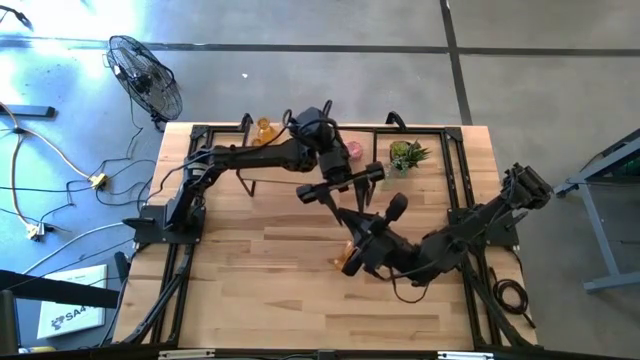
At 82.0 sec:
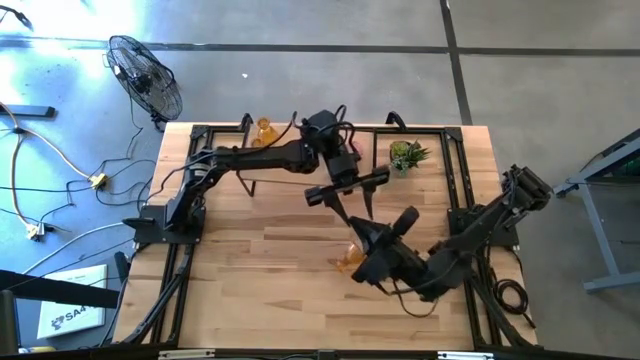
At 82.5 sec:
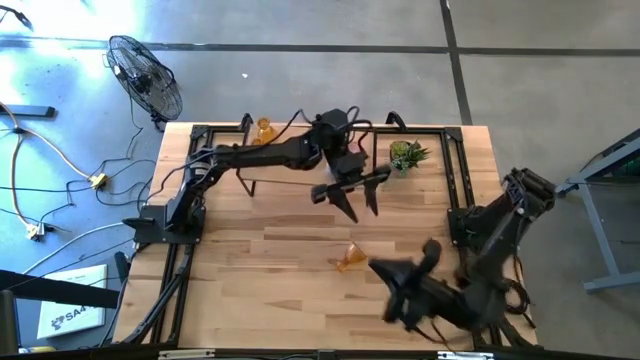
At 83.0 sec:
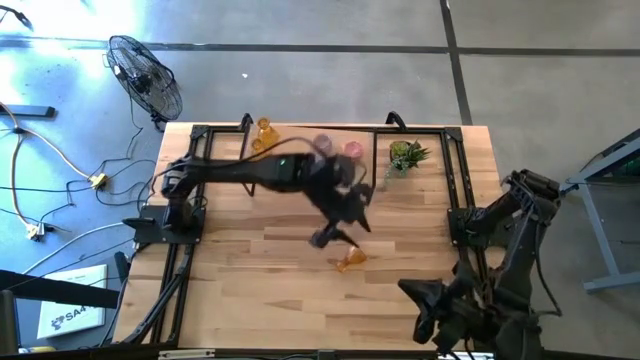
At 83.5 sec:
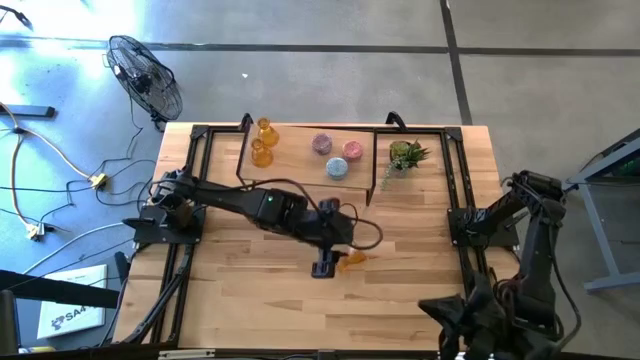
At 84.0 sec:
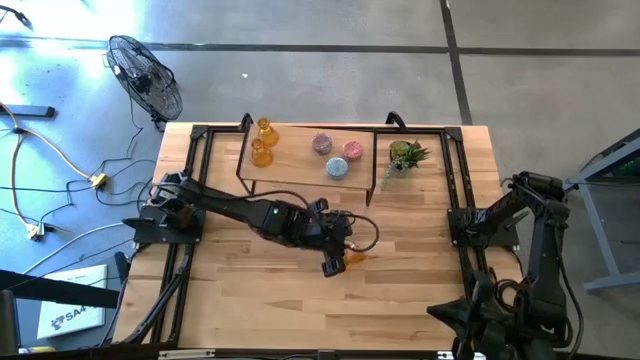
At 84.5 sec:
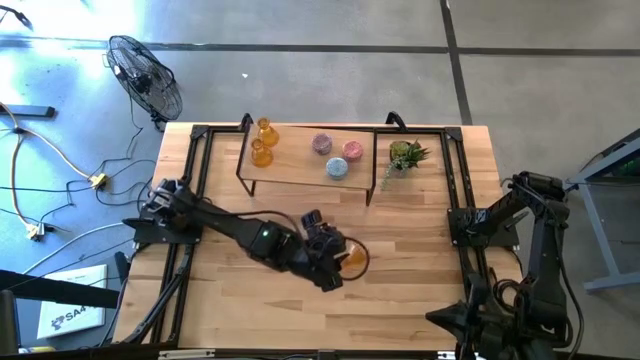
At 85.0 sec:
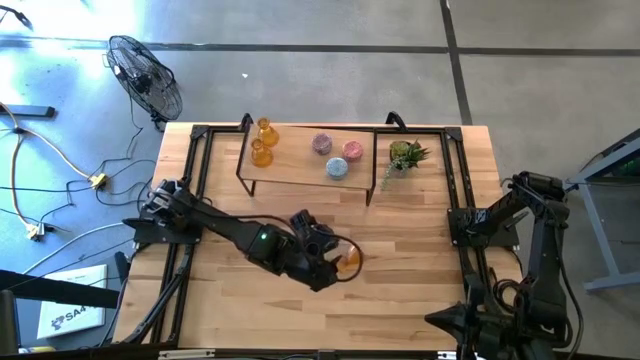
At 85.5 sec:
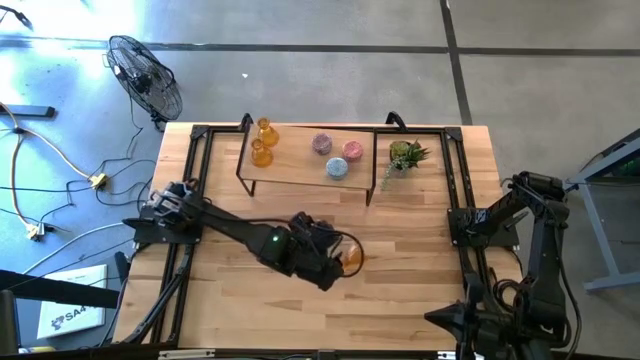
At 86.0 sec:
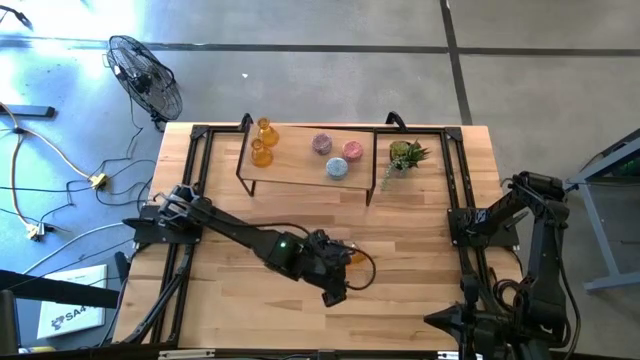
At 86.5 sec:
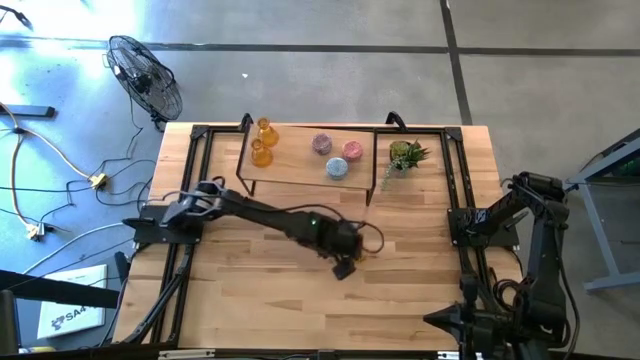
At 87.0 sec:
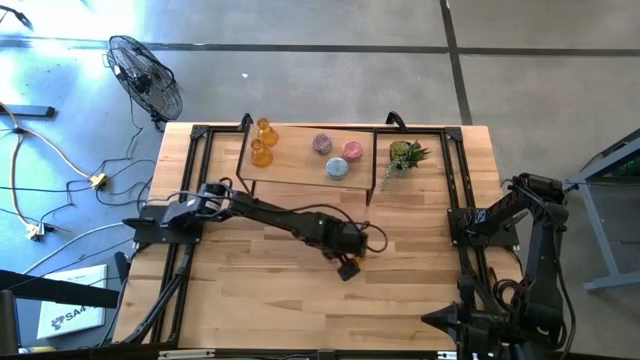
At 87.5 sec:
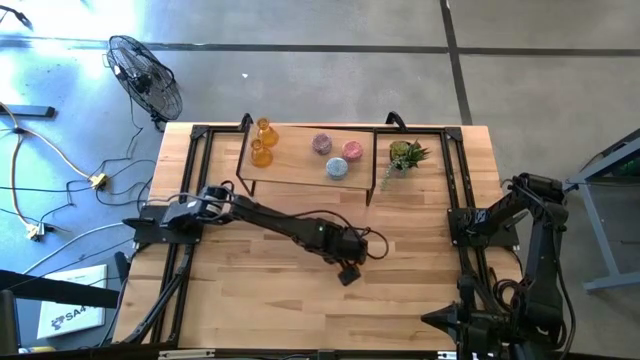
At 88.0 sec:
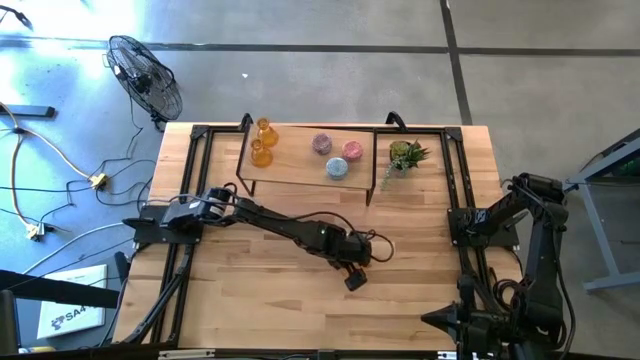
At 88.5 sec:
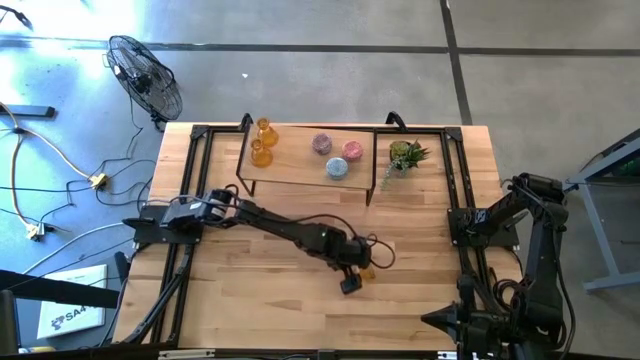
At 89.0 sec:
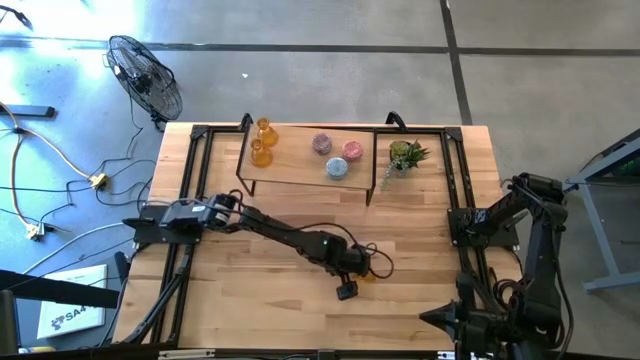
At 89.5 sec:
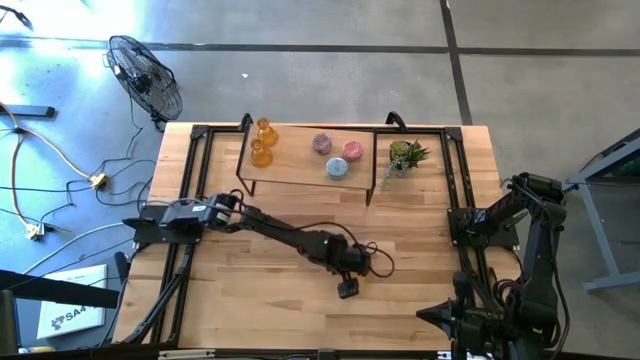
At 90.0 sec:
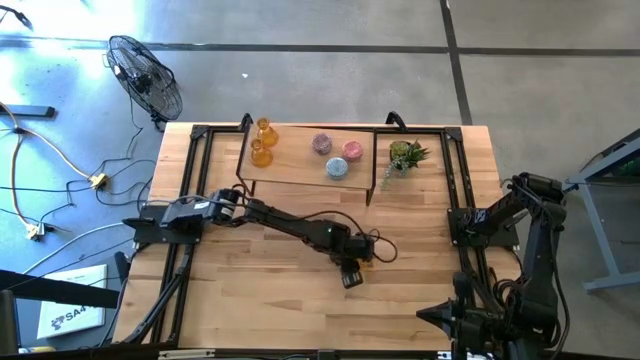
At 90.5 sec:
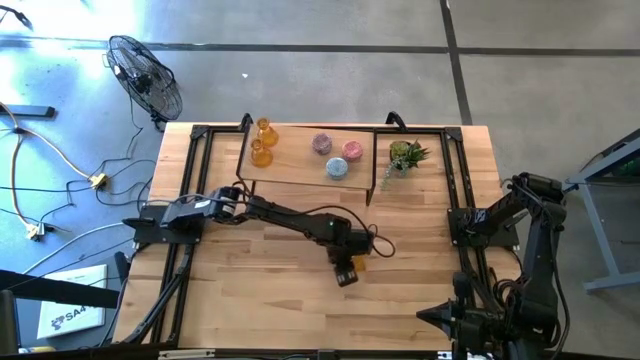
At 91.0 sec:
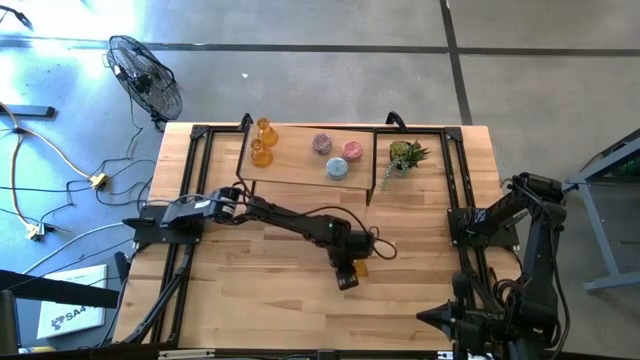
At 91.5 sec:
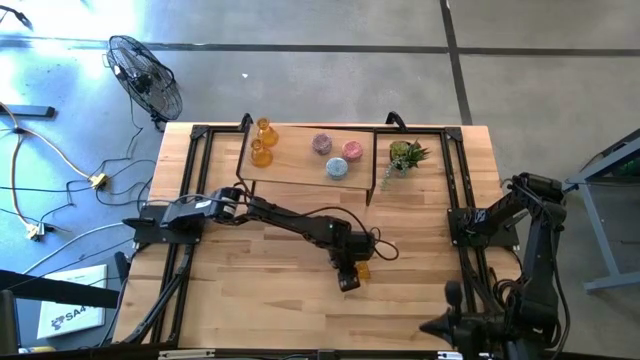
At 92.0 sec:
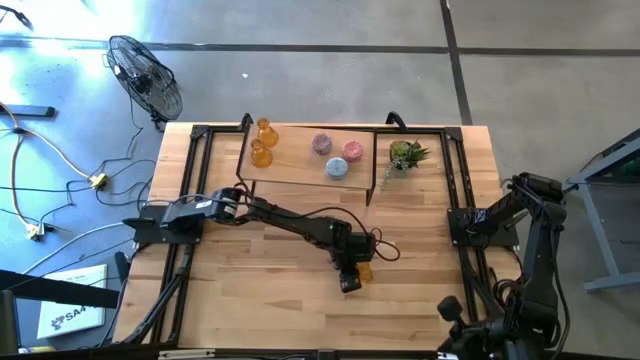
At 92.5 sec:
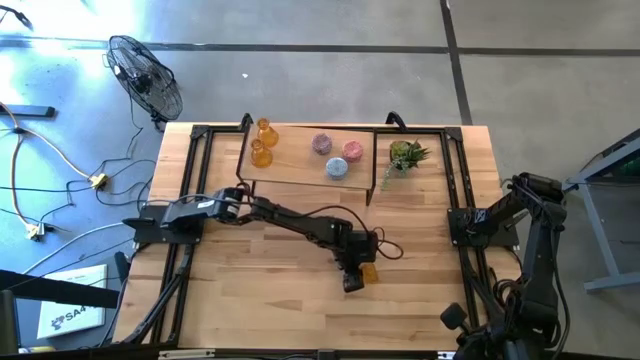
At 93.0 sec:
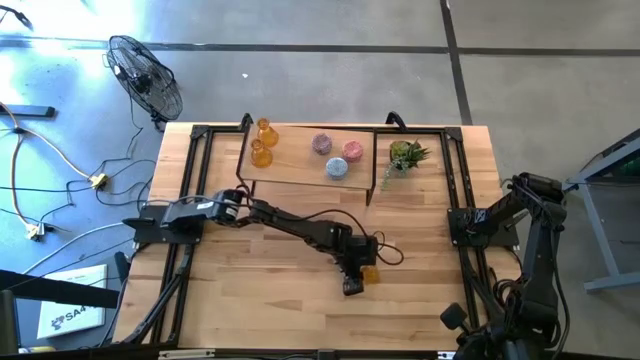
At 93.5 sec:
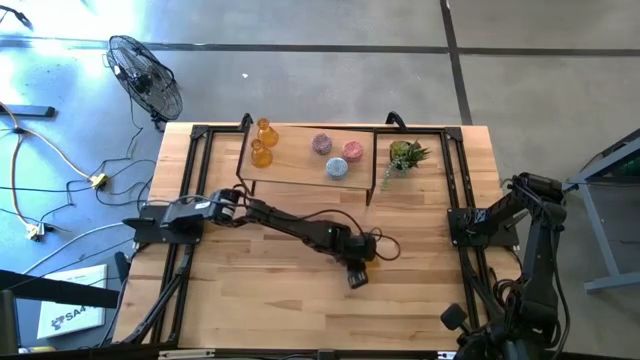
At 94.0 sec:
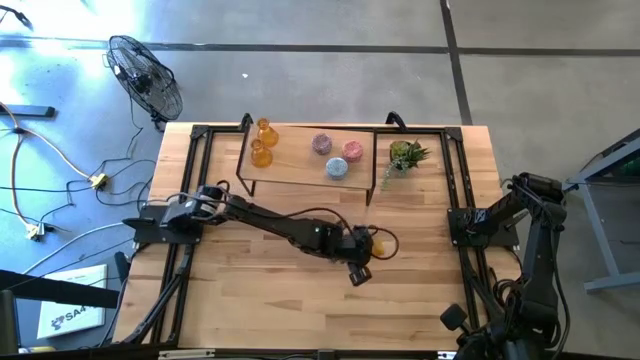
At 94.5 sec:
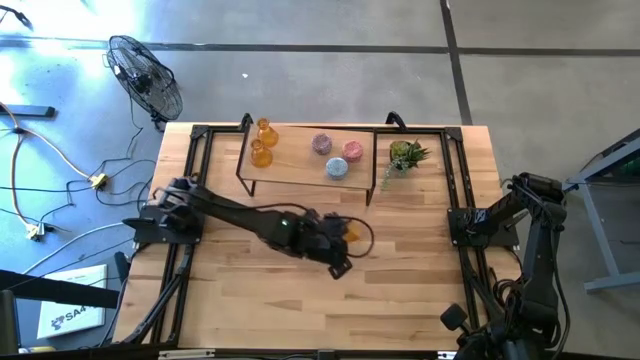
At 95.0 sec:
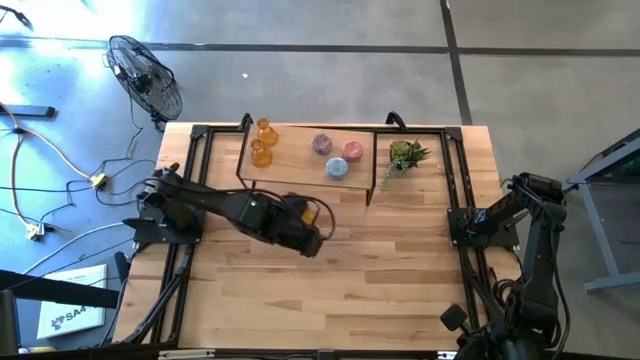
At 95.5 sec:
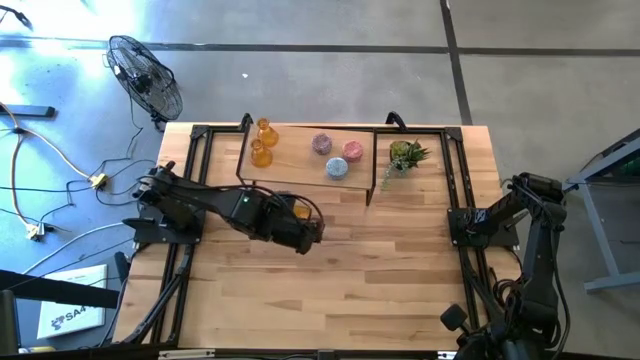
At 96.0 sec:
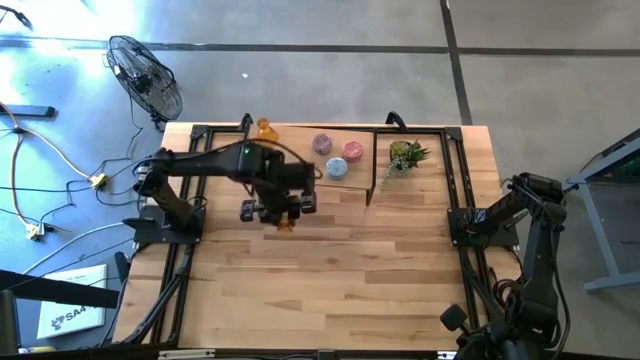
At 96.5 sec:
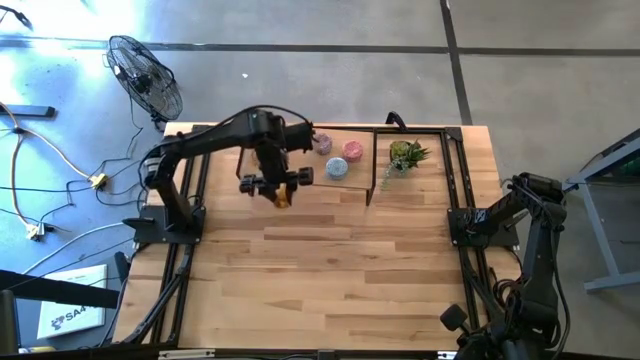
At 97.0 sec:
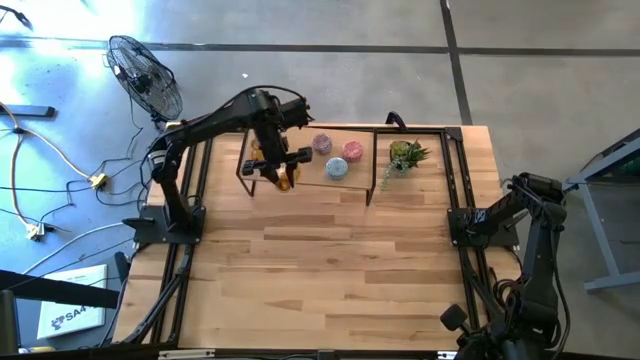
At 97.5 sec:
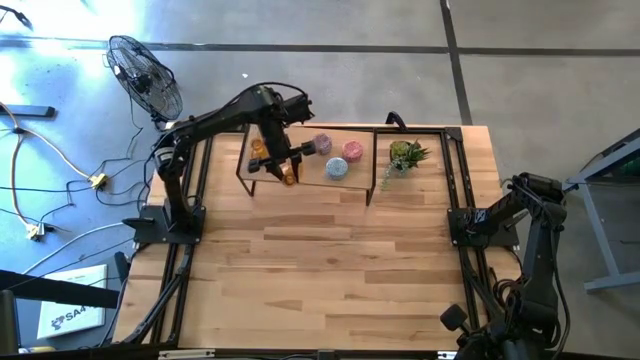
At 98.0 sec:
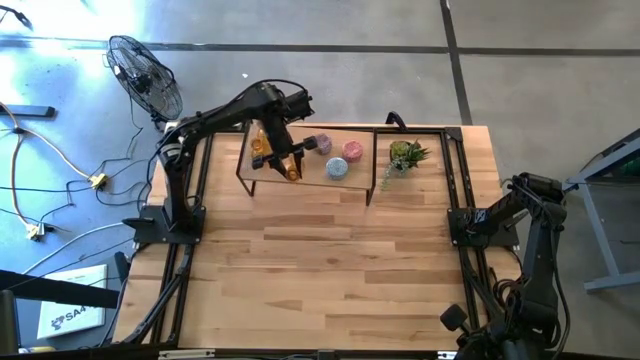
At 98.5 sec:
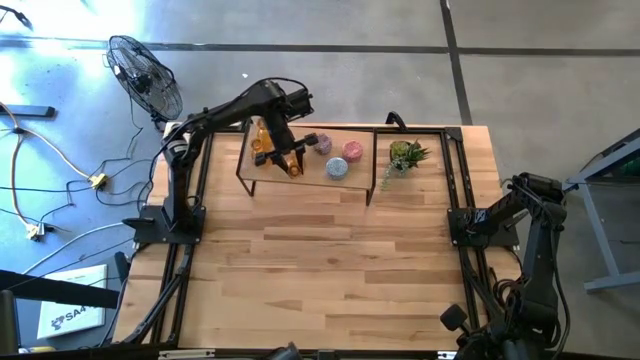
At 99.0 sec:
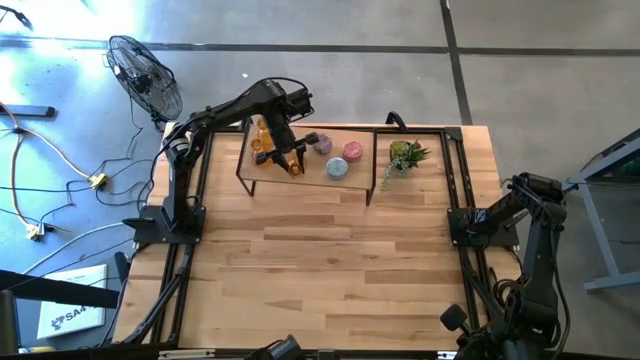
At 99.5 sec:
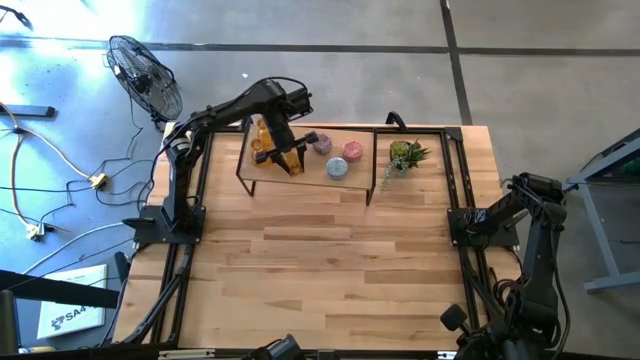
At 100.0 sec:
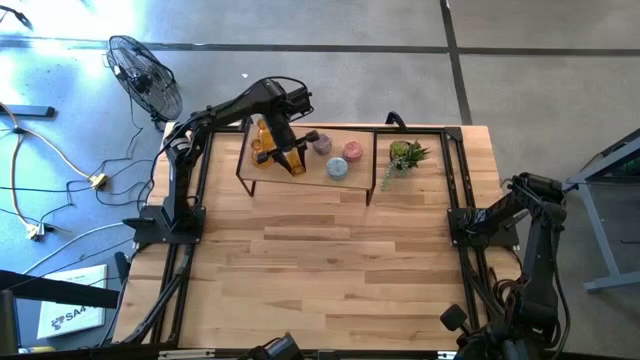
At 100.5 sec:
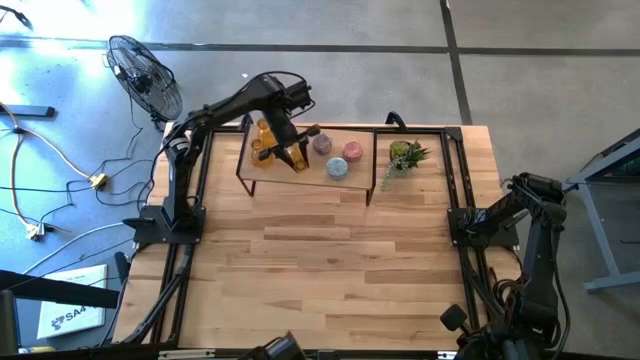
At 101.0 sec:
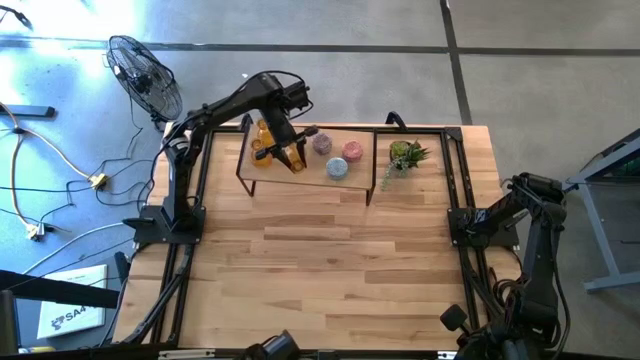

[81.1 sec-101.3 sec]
Task: Pick & Place candle stick holders
Put the yellow glass candle holder on the shelf
